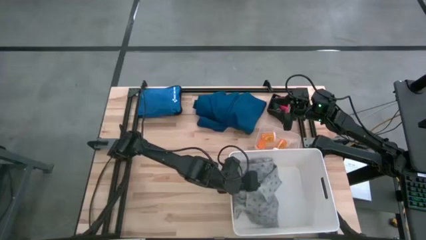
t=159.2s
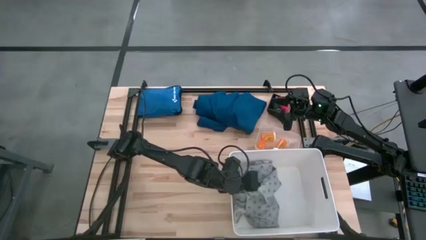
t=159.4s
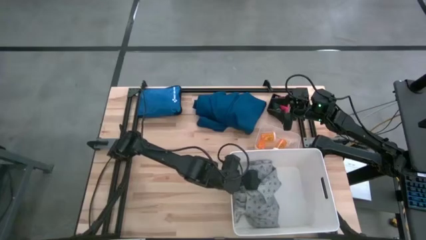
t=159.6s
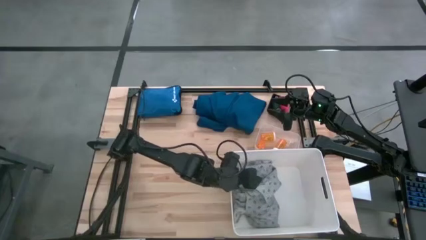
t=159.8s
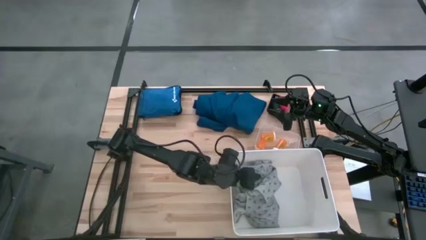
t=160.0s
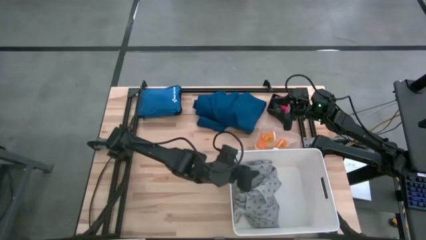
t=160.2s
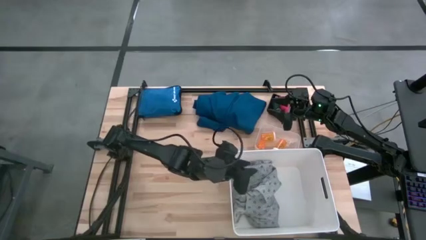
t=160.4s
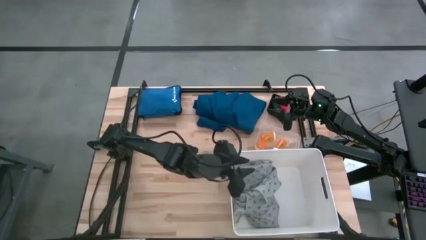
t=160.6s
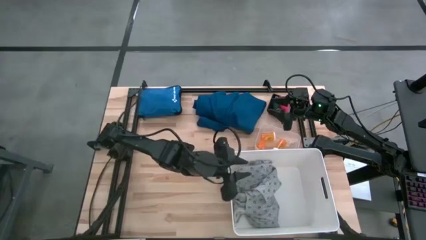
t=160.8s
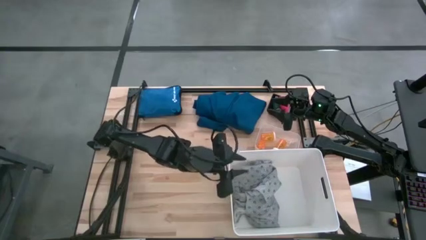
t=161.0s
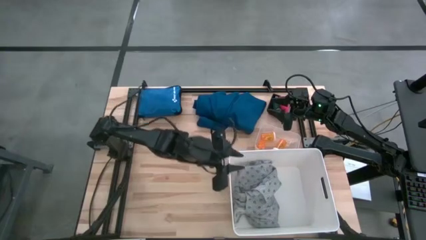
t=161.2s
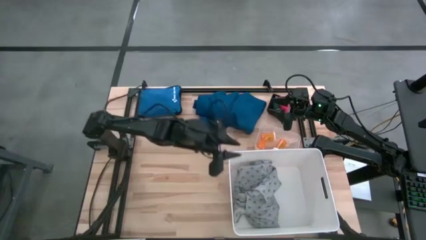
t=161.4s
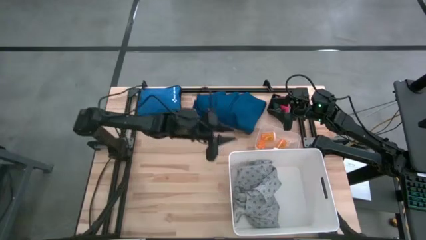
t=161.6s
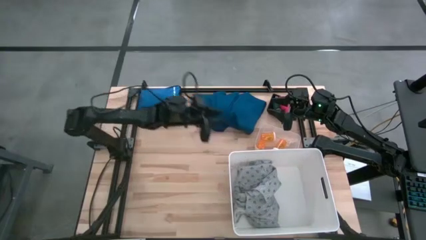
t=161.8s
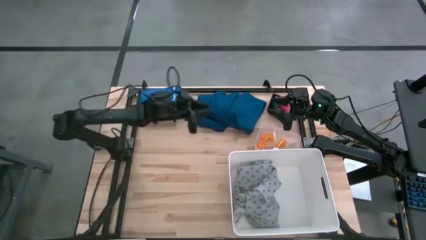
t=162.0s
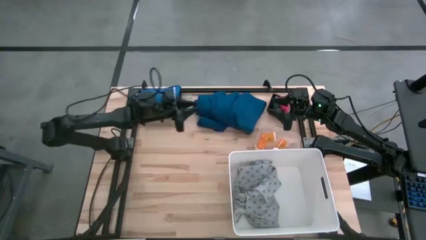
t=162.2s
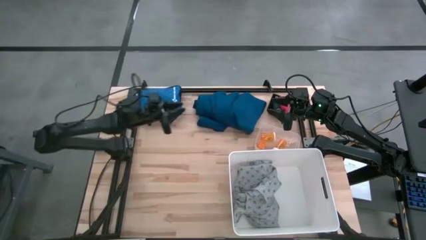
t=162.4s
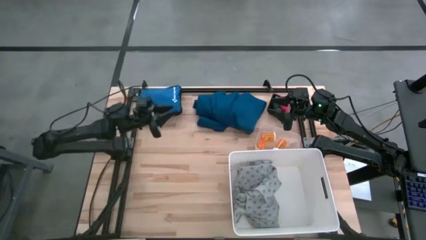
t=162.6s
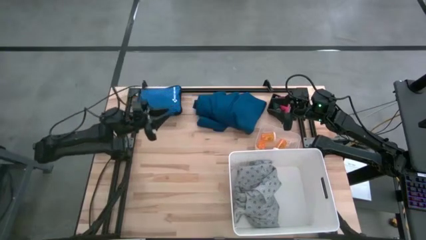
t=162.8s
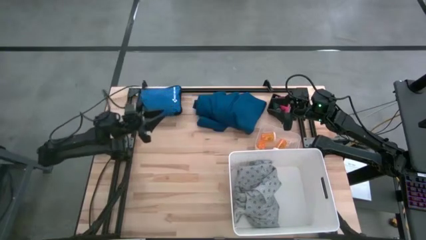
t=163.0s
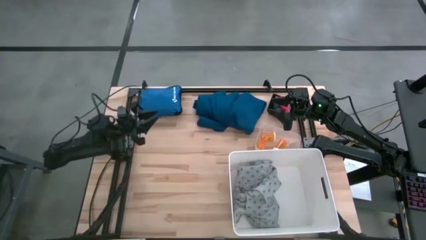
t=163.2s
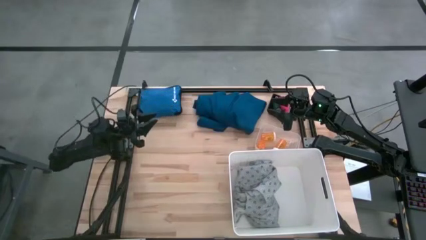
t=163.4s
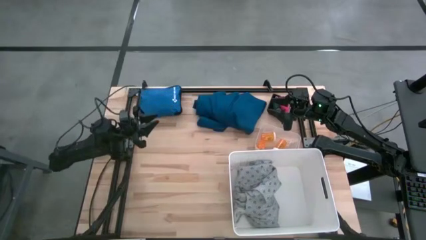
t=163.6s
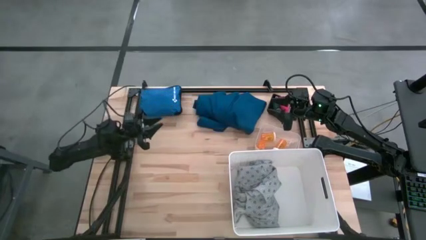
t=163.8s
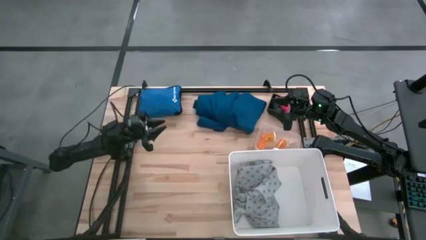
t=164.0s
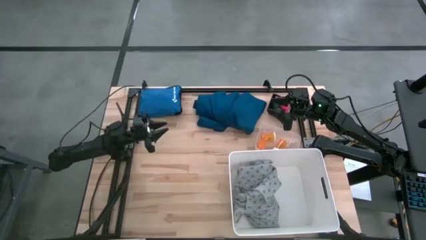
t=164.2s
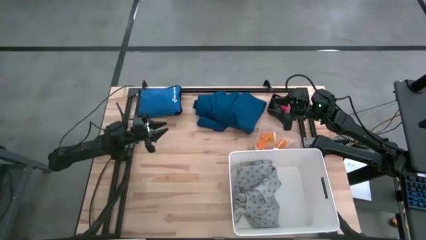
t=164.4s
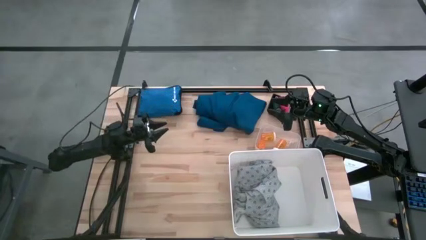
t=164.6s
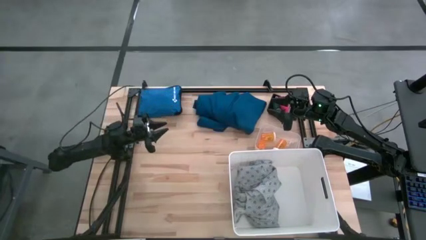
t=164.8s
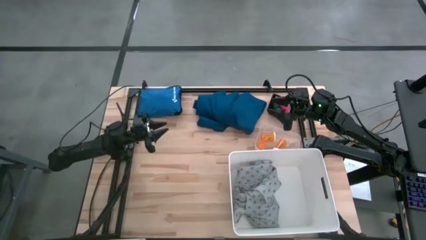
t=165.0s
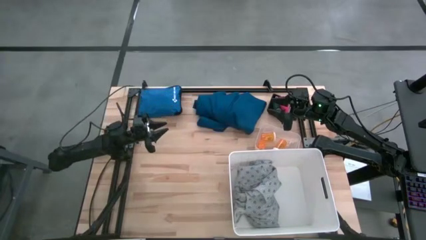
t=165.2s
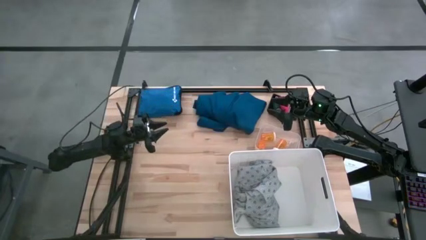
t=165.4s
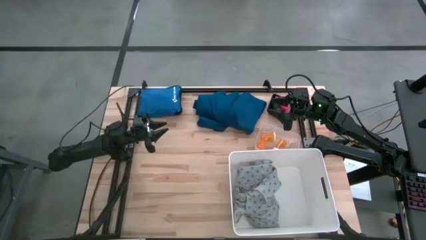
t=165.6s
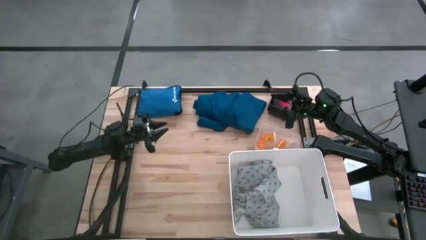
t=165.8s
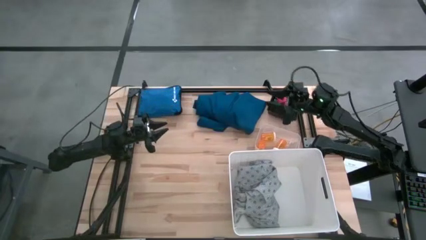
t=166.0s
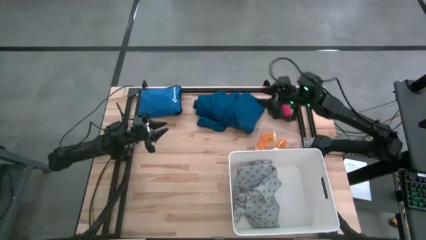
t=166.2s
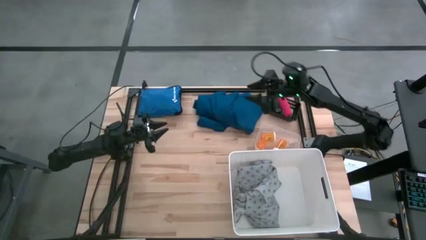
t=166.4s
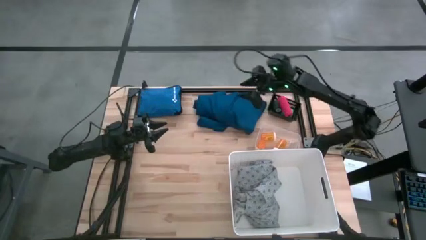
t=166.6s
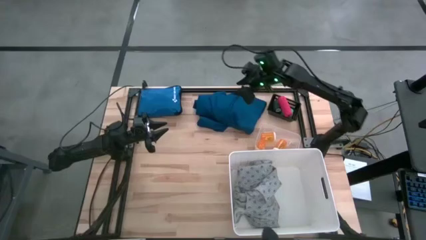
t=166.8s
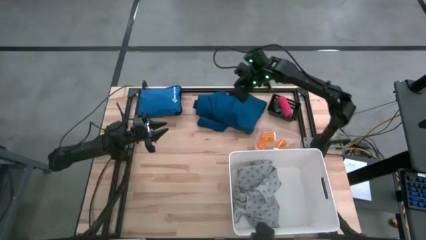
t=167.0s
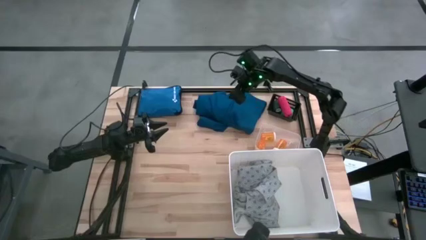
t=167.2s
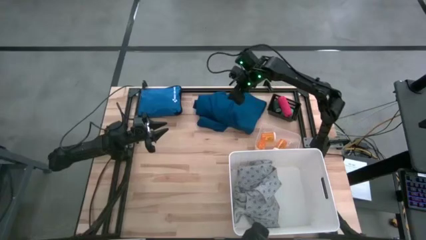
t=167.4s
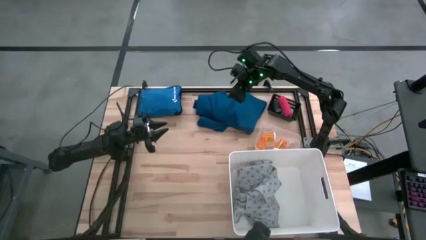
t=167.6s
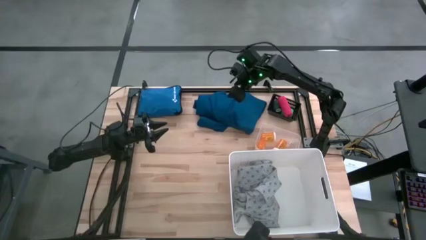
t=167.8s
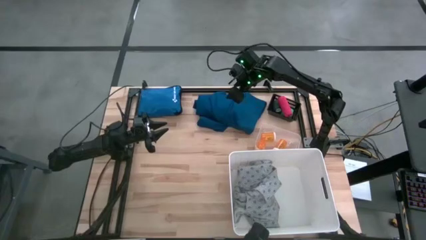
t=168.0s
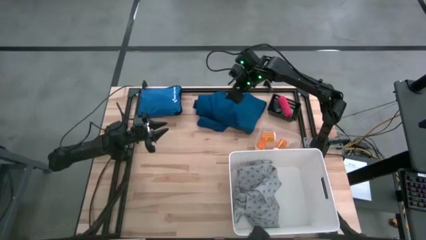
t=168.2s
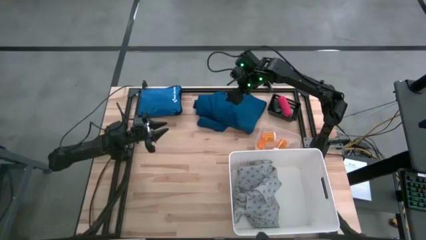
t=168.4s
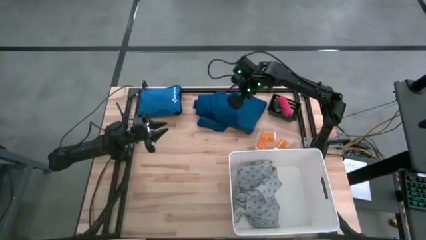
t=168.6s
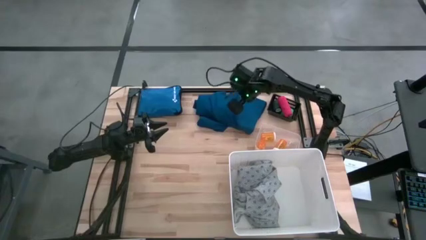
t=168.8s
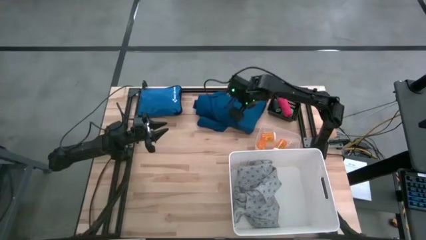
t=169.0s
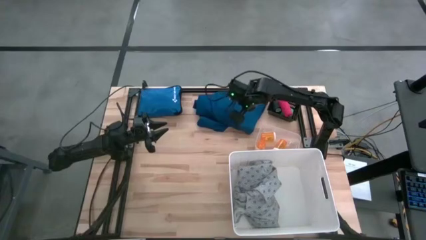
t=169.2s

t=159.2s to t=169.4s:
Task: Pick & place medical supplies in basket/bin
Put the blue patient gown into the white bin

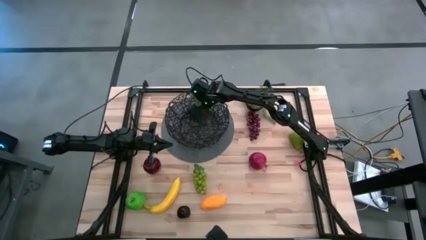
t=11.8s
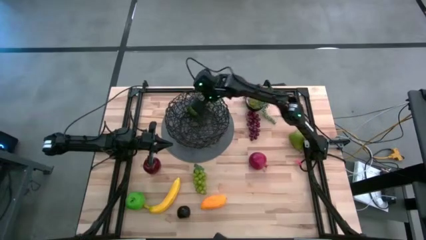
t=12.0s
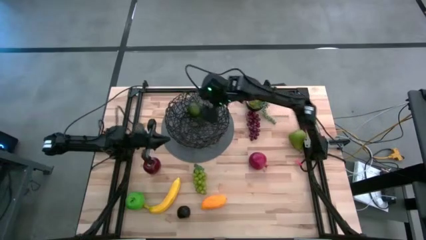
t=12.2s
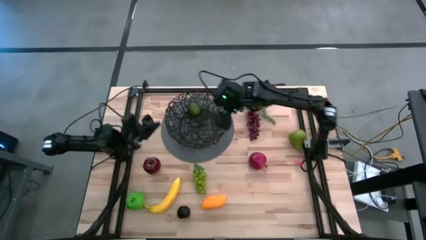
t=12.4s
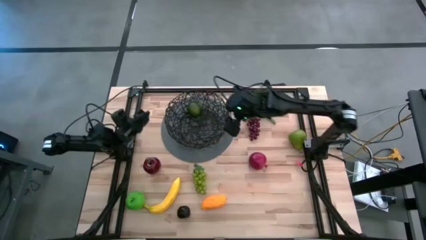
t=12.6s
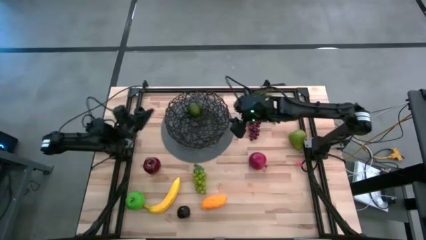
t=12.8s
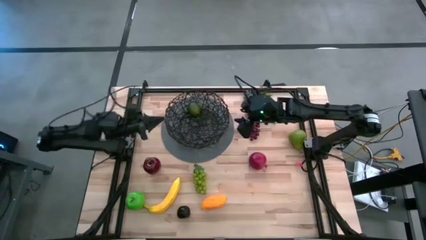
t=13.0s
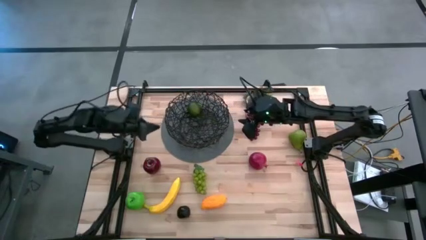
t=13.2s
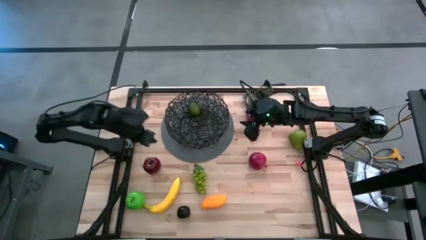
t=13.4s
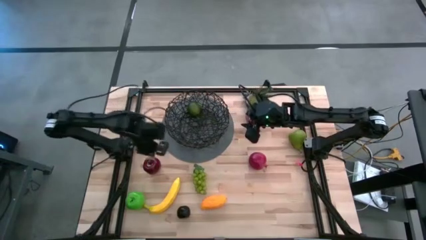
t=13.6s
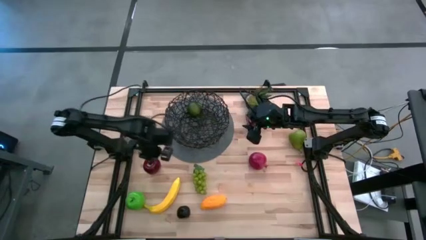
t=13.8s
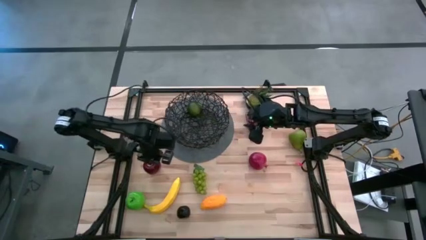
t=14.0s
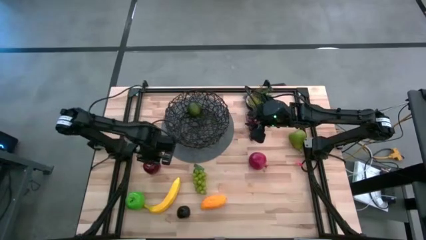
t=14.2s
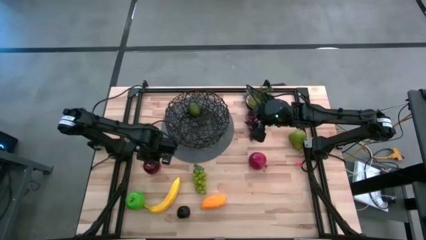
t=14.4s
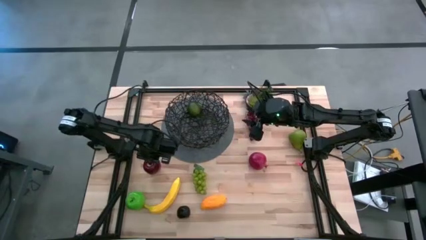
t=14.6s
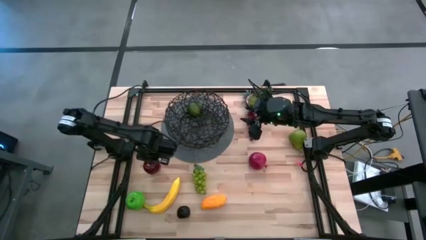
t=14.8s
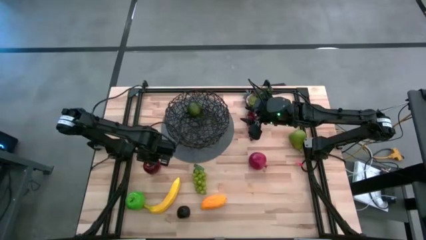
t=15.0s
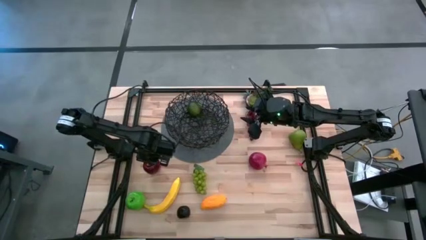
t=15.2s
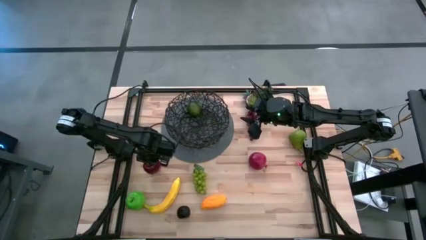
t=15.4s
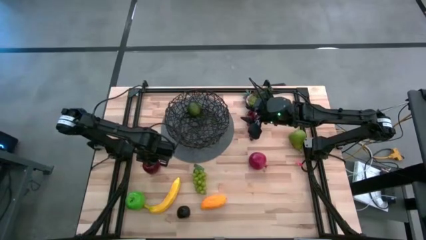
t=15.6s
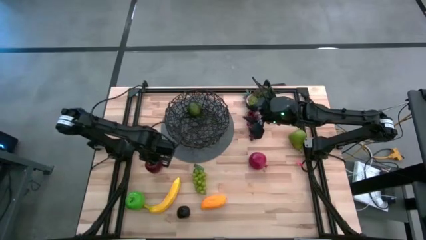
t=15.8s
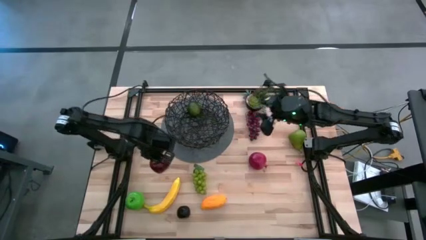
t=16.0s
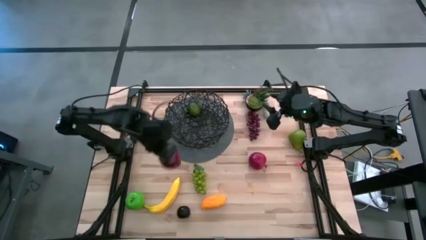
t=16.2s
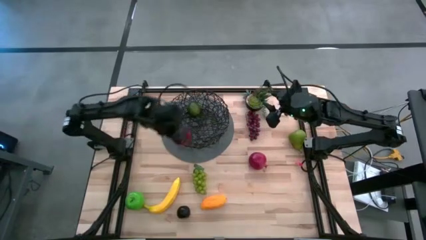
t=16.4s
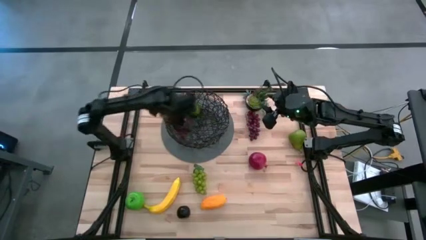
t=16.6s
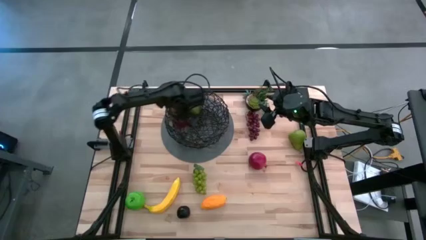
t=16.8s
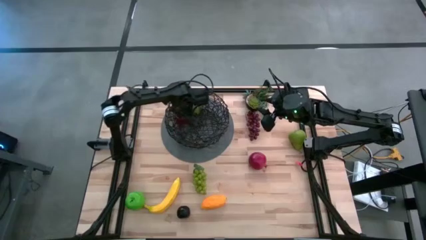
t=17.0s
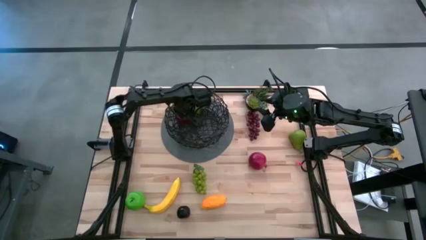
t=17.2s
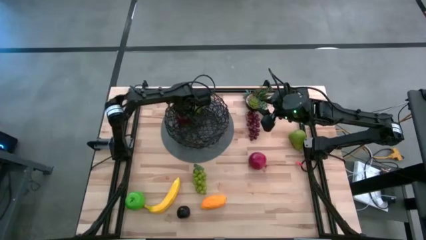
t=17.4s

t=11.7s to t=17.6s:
Task: Build produce basket
Put the red apple into the black wire basket
